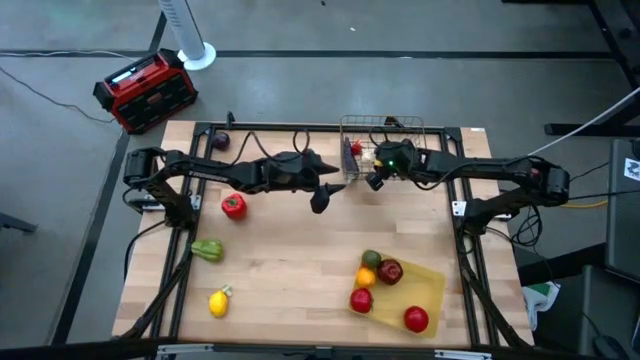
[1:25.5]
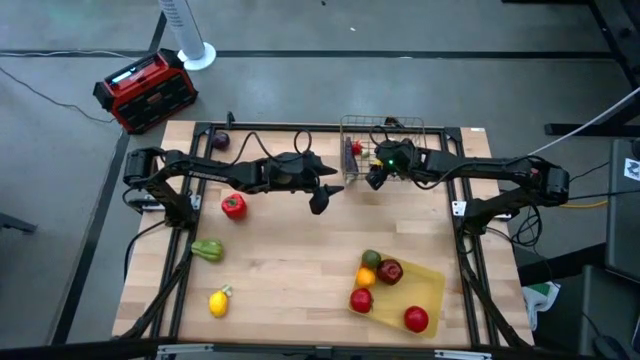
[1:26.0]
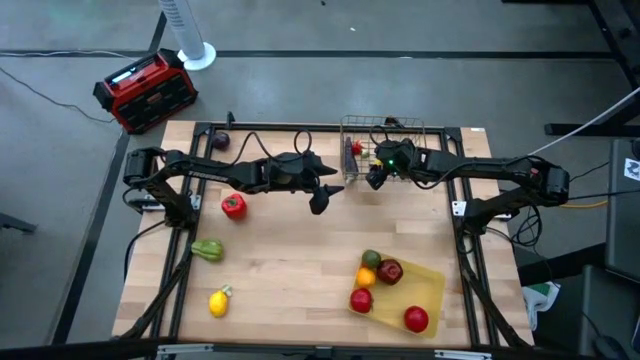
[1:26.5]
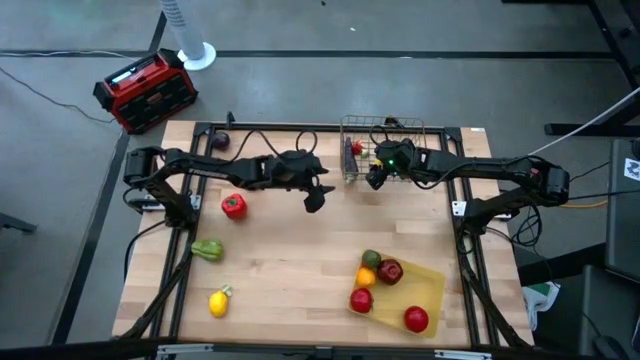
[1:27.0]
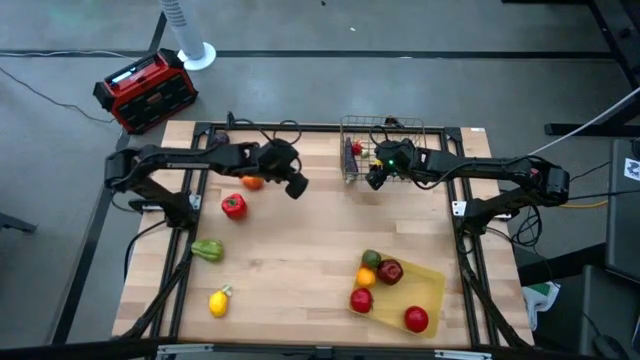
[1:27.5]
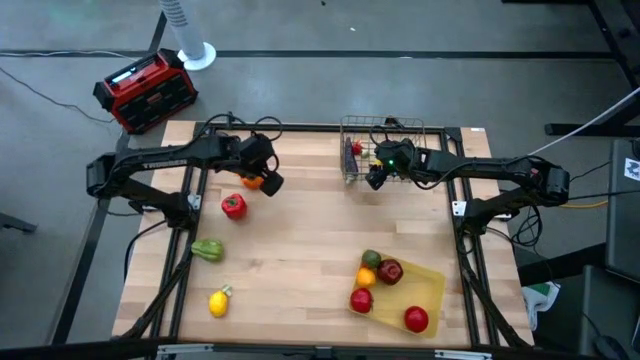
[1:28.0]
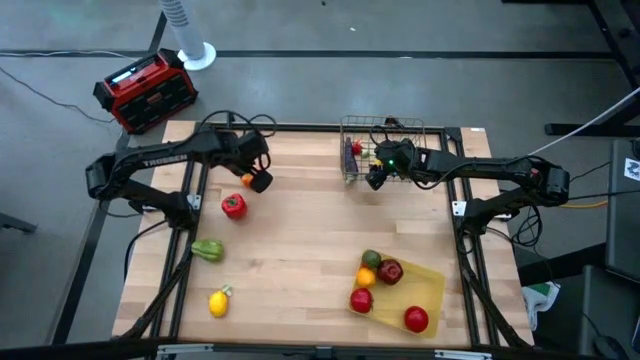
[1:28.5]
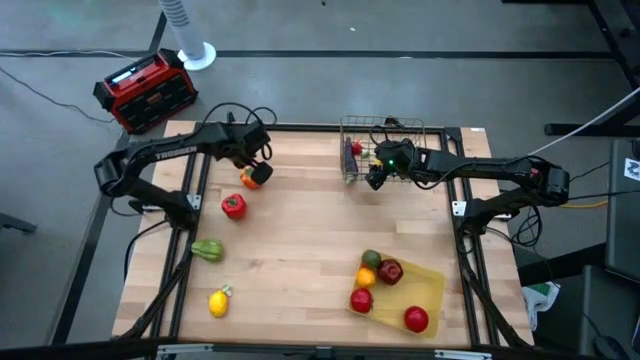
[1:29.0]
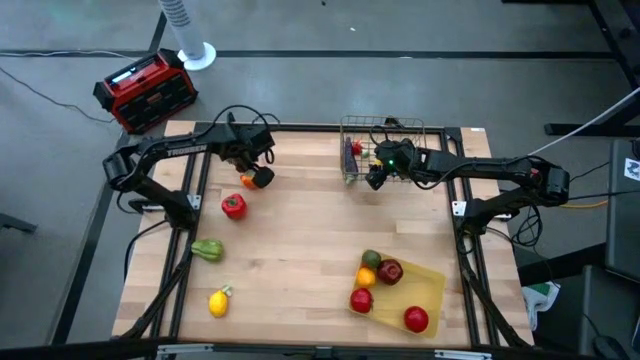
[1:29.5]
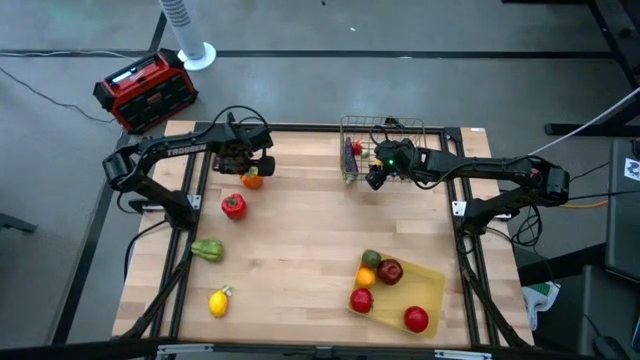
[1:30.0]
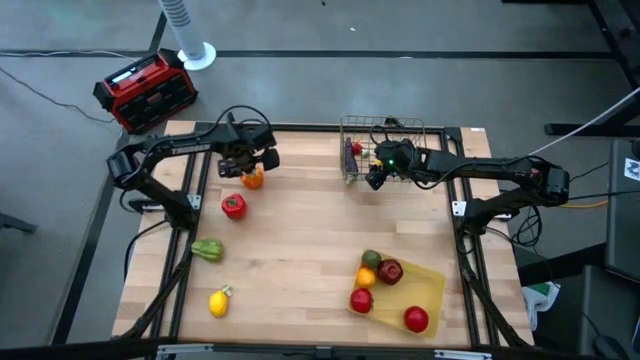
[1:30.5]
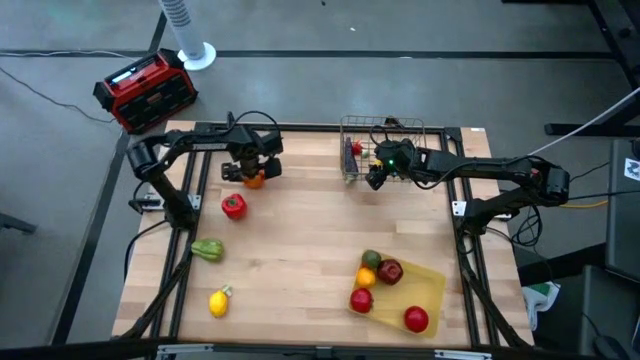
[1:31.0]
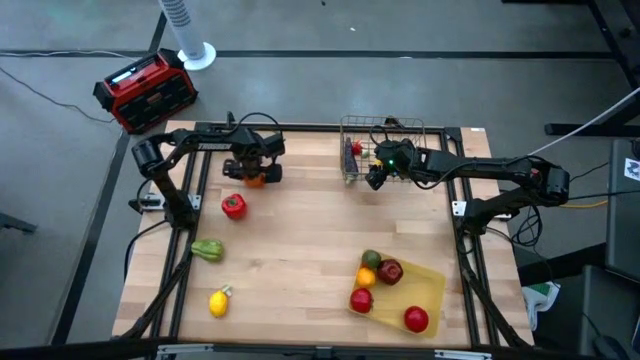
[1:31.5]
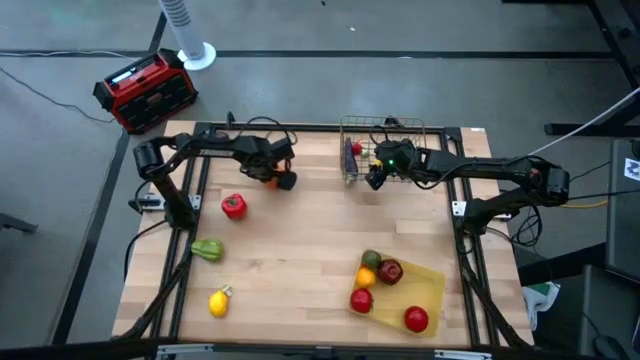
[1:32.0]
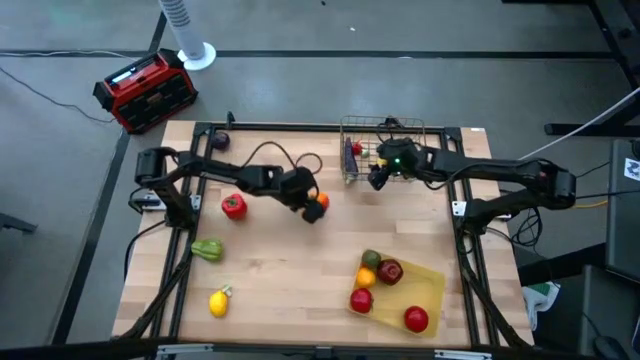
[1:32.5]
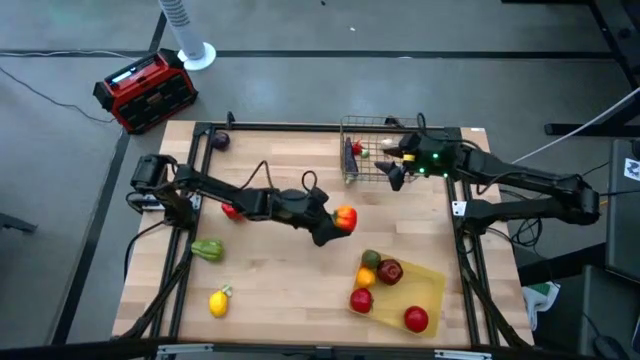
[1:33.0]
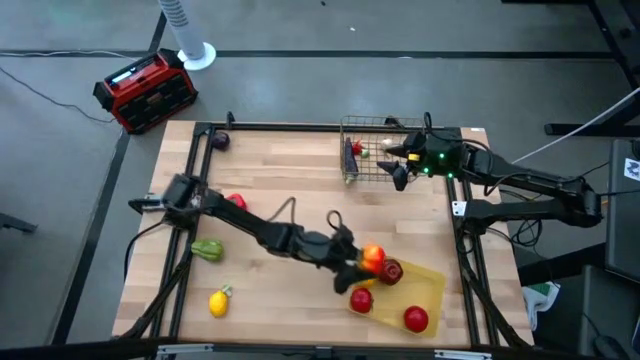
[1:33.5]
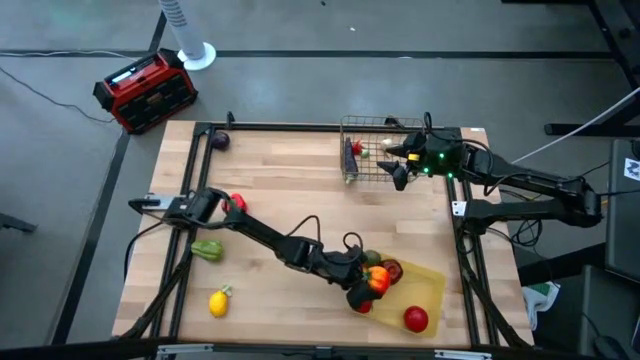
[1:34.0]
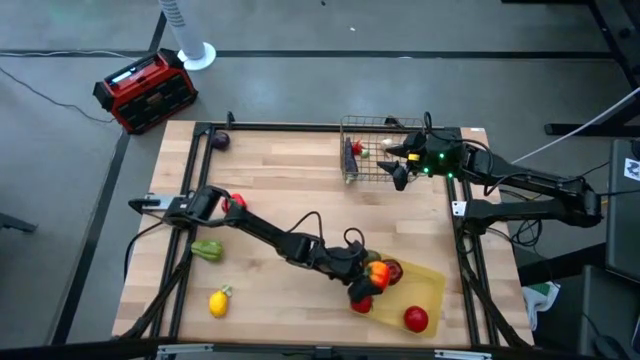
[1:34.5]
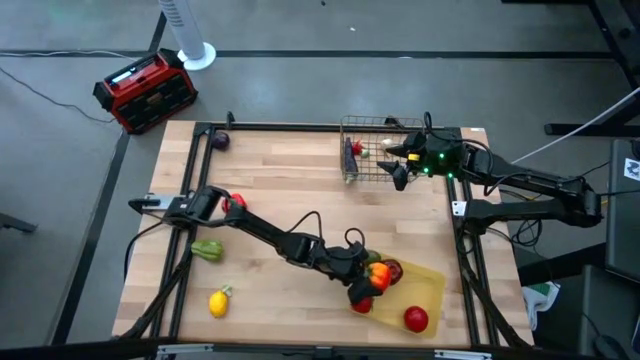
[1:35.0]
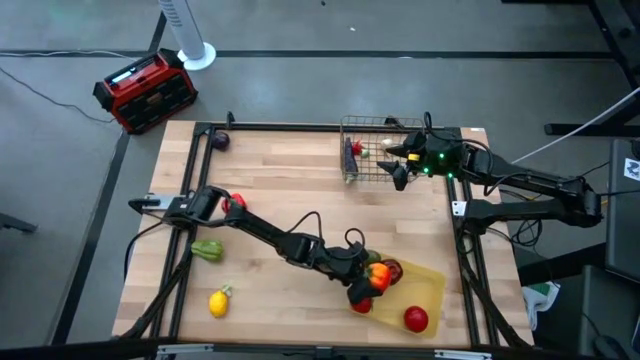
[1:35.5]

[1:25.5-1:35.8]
Task: Sort produce into baskets
Put the yellow tomato into the yellow bin

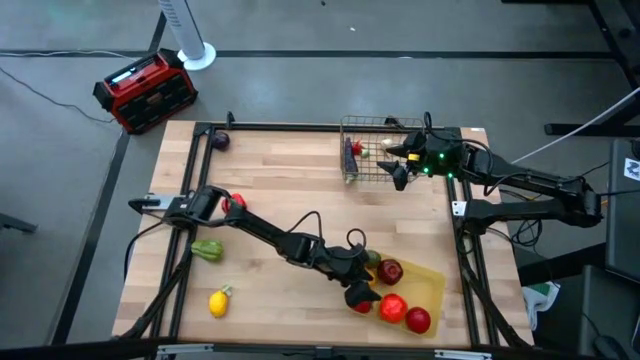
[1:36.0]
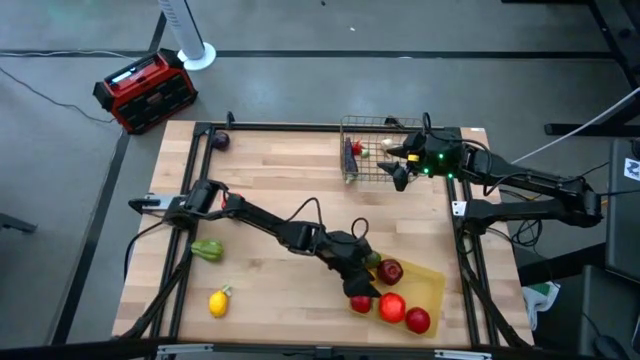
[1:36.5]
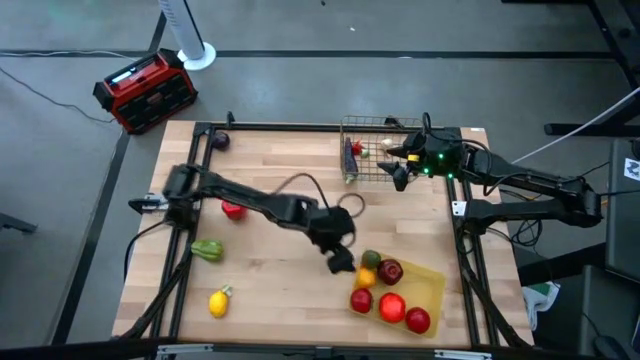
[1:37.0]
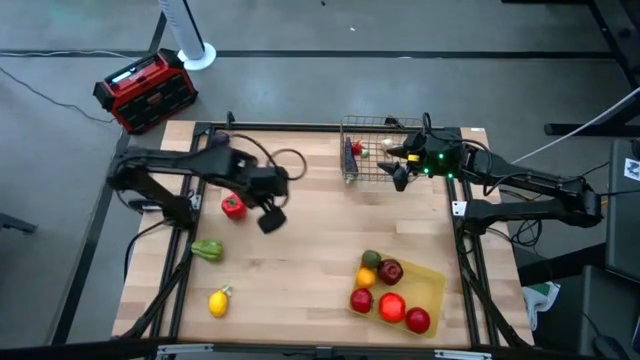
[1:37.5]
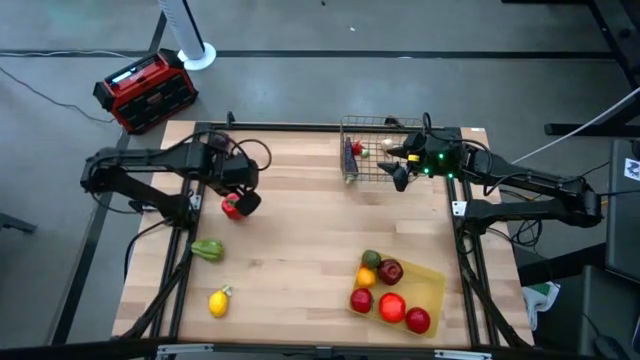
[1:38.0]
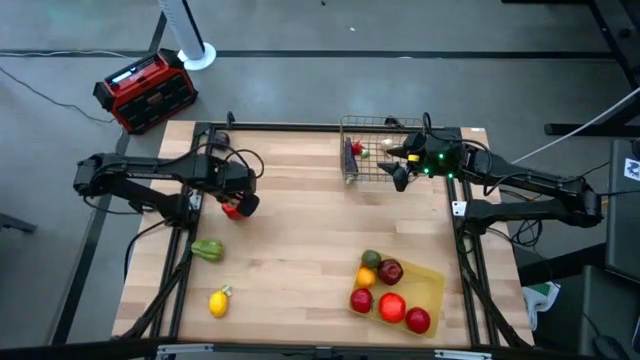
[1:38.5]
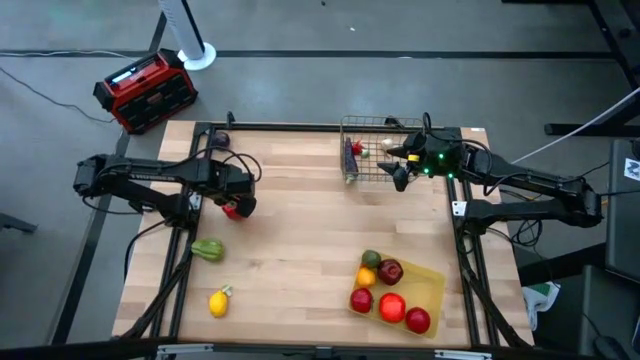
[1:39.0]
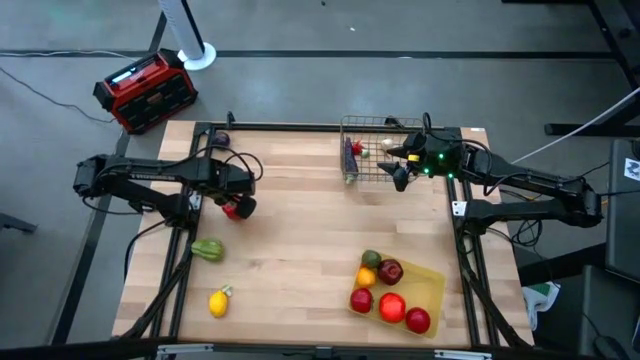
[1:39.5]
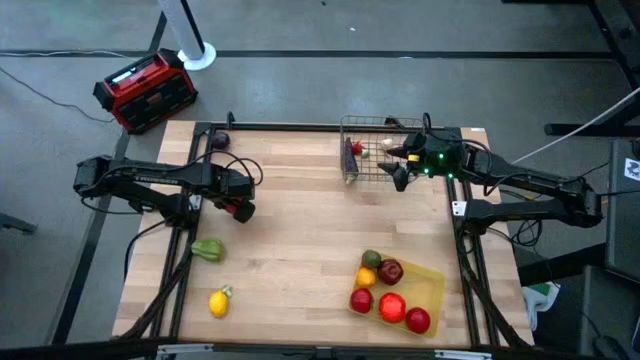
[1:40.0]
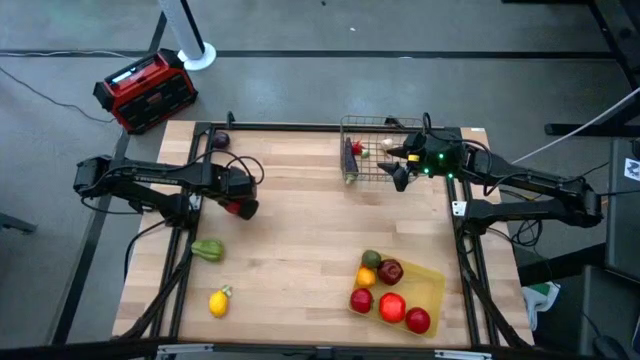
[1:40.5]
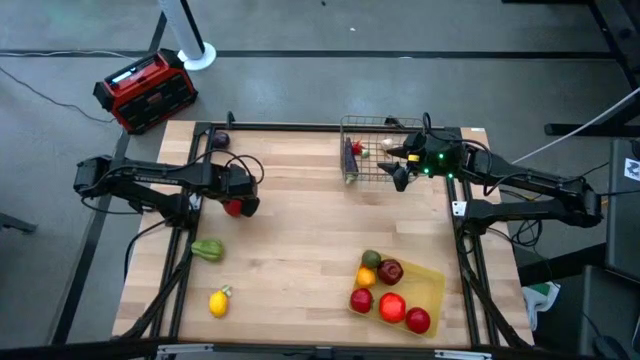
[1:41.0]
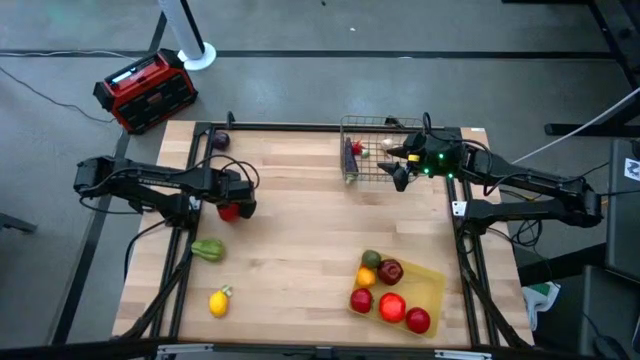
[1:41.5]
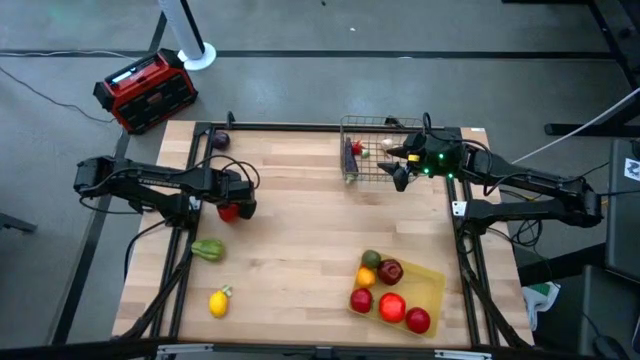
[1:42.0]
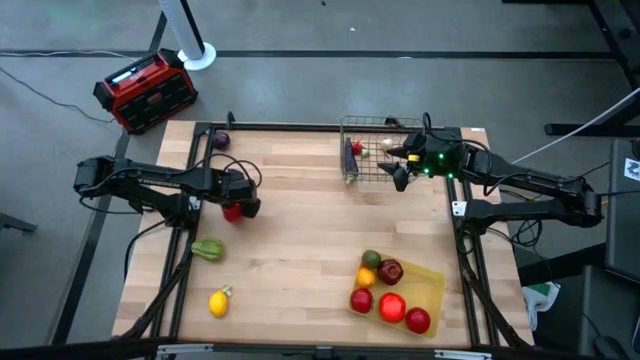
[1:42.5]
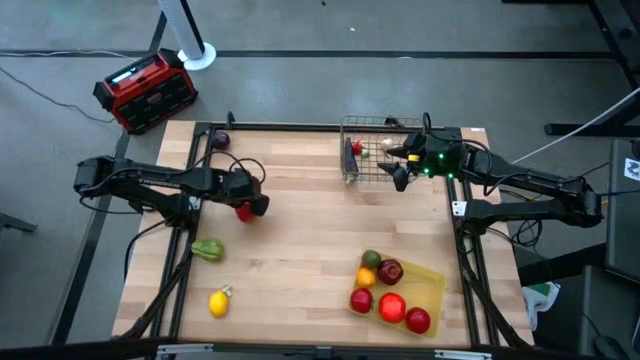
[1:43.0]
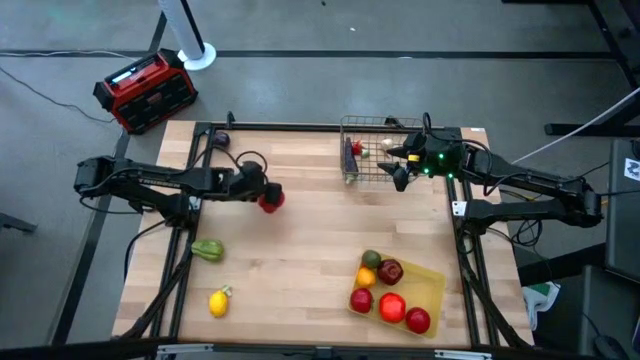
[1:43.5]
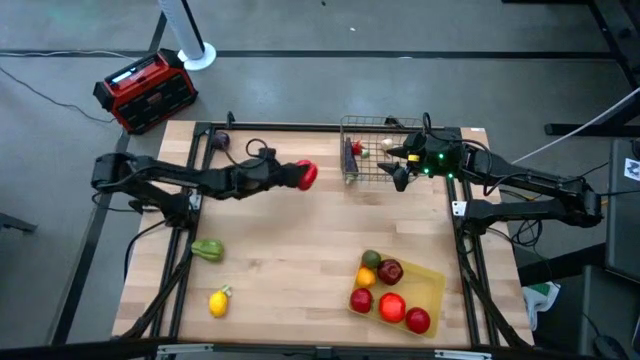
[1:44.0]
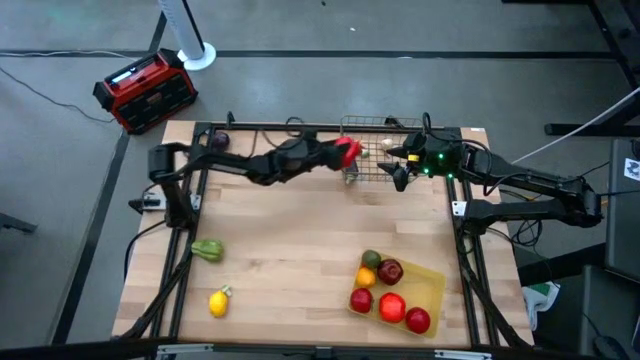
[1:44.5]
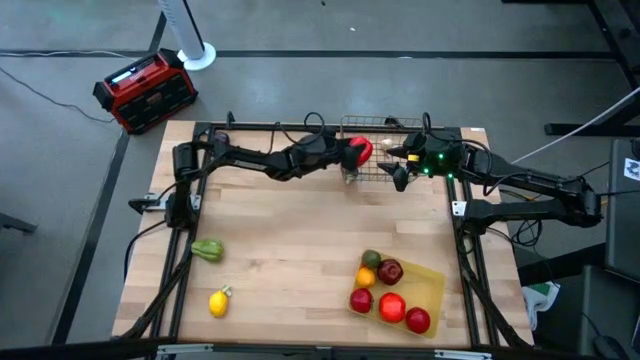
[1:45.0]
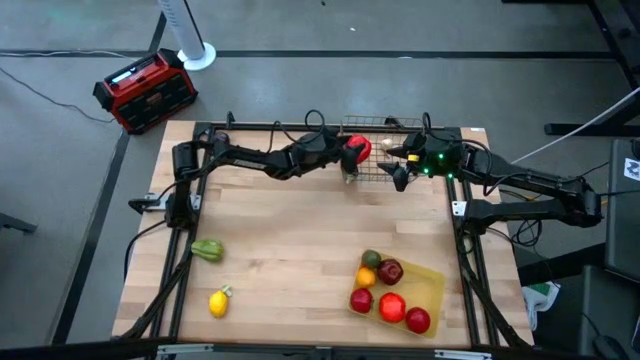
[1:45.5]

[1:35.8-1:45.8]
Put the red bell pepper into the wire basket

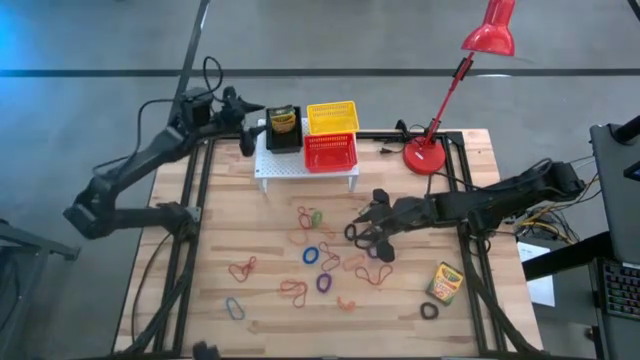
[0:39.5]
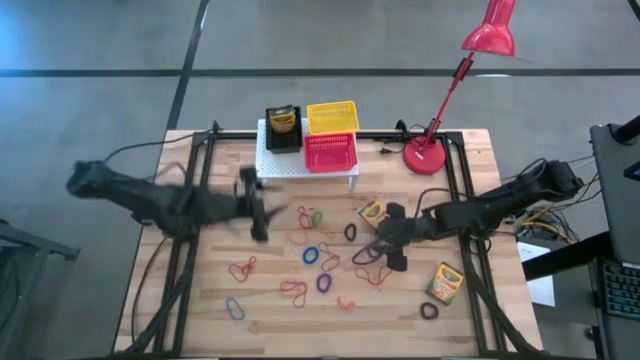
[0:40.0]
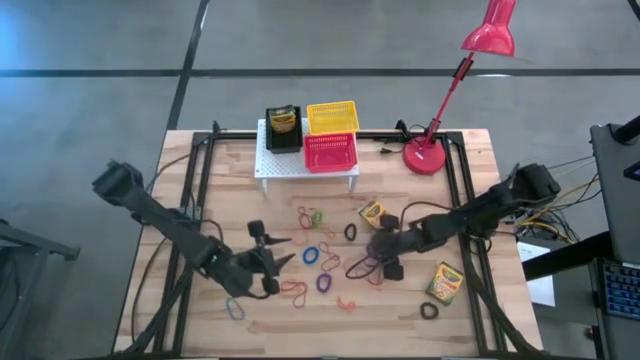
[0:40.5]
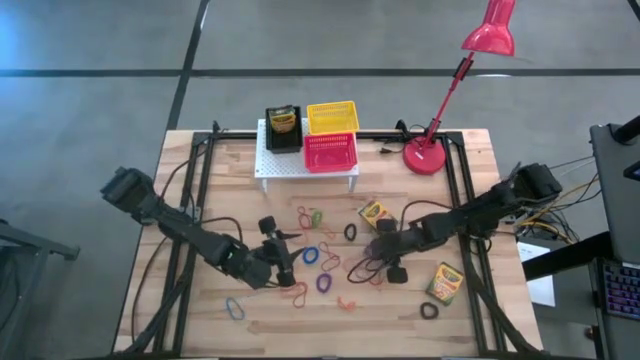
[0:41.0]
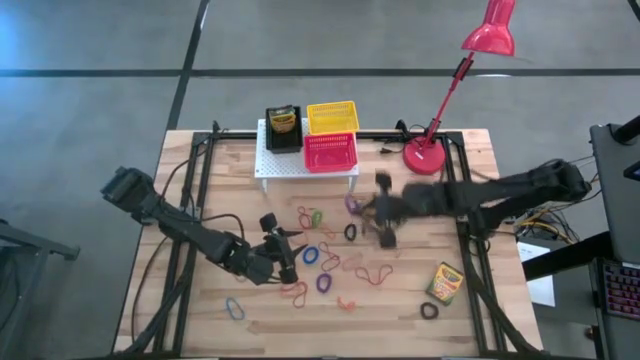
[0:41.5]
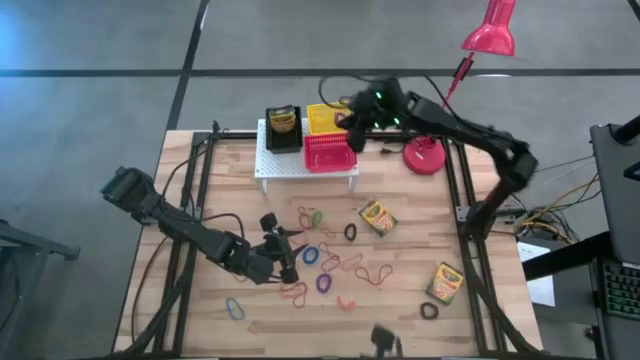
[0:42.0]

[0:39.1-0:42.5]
Task: Pick & Place Office Desk Supplies
Put the violet spring keychain into the yellow bin on the shelf
